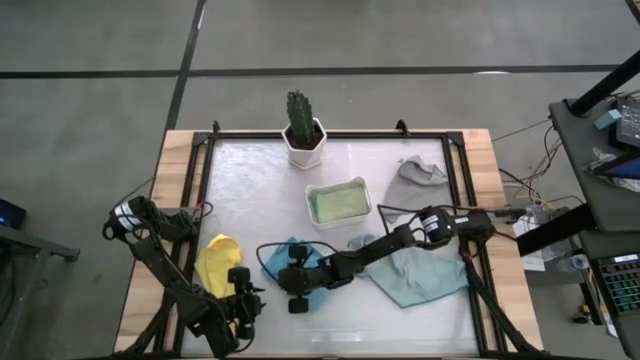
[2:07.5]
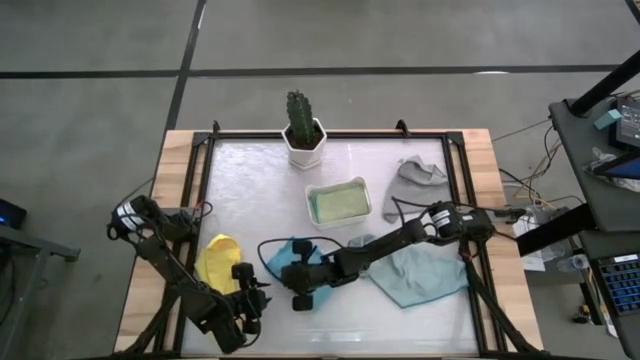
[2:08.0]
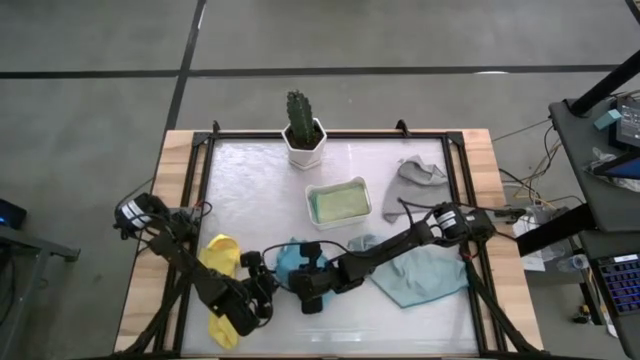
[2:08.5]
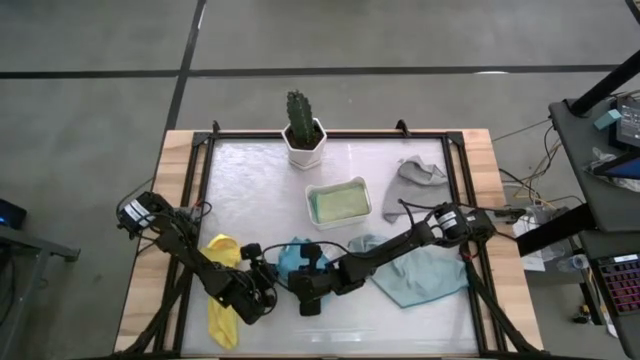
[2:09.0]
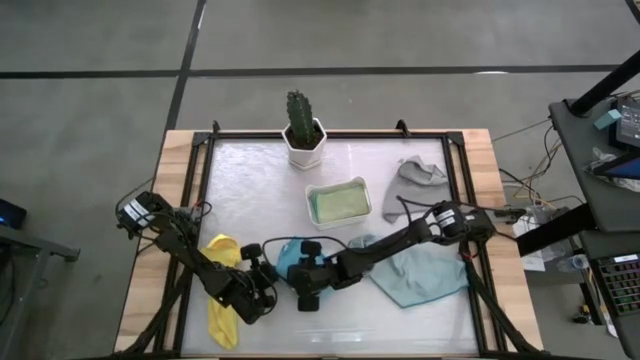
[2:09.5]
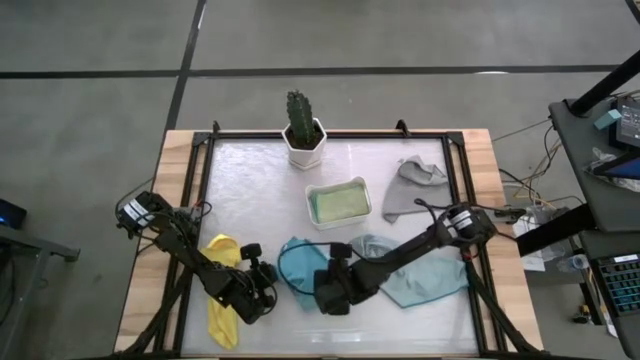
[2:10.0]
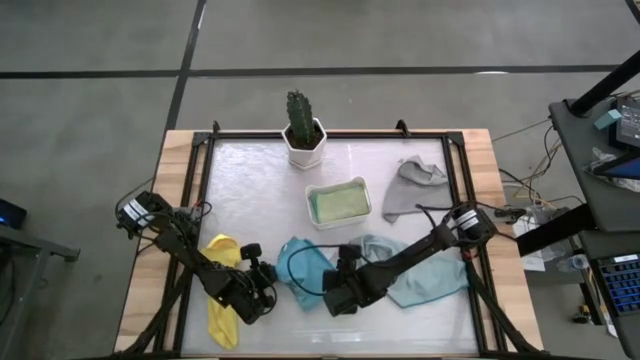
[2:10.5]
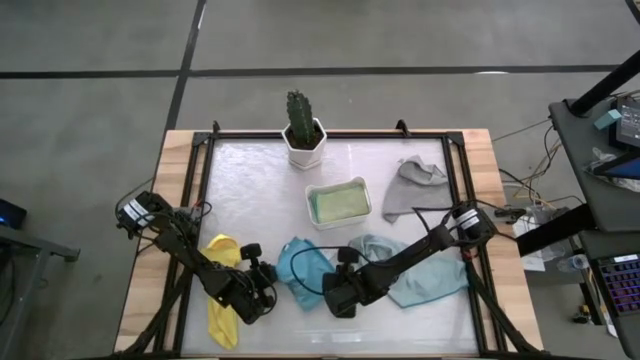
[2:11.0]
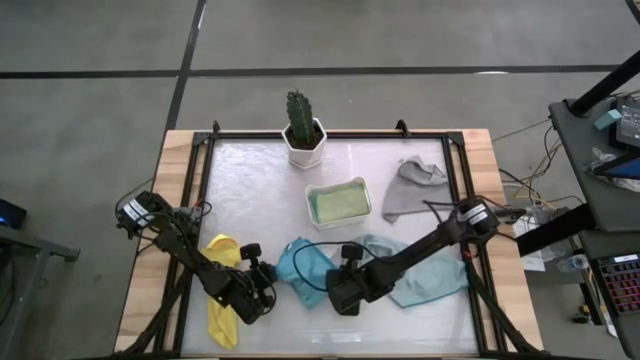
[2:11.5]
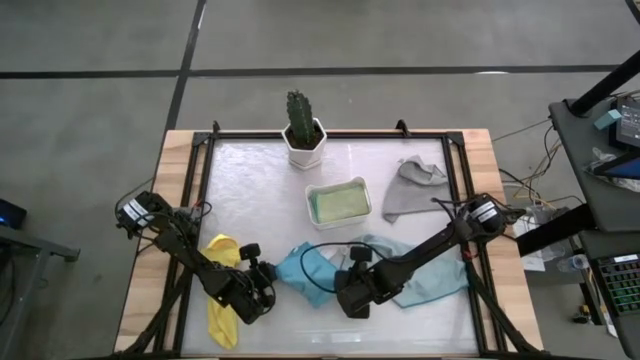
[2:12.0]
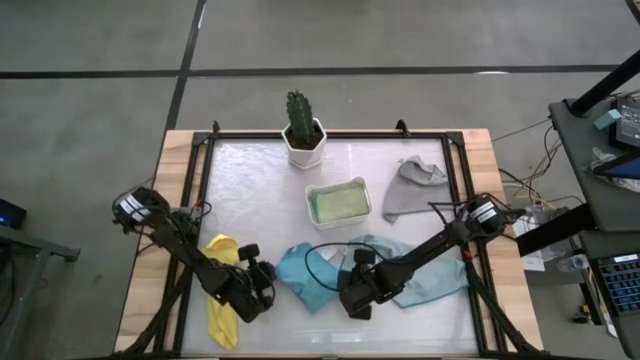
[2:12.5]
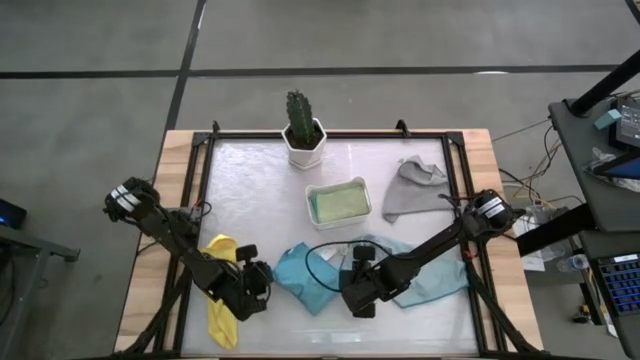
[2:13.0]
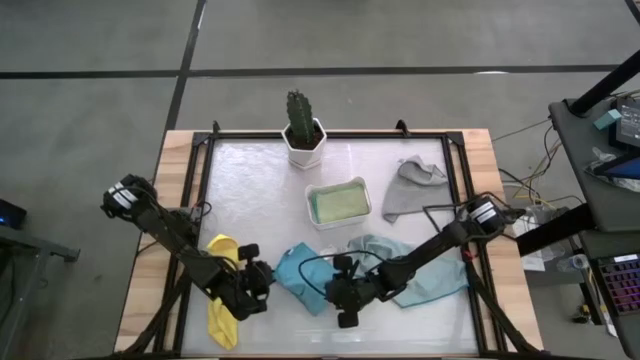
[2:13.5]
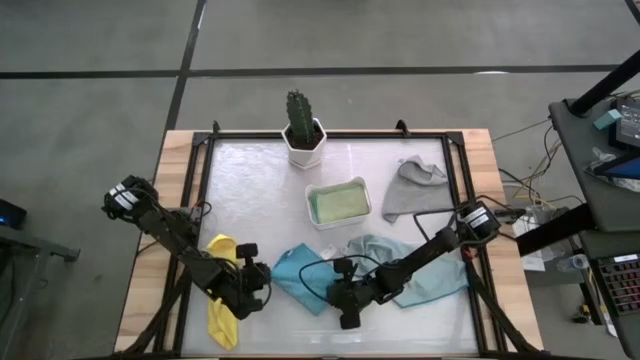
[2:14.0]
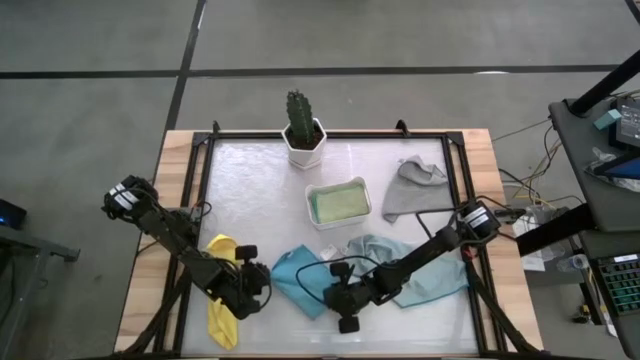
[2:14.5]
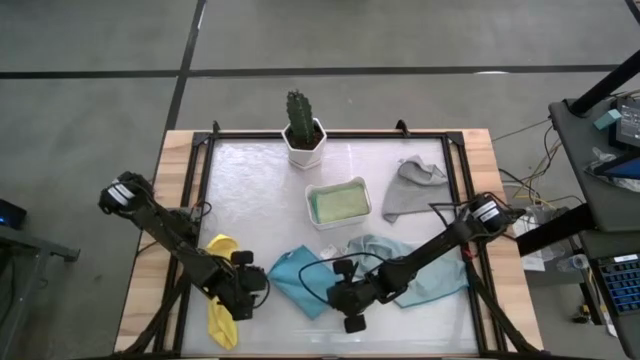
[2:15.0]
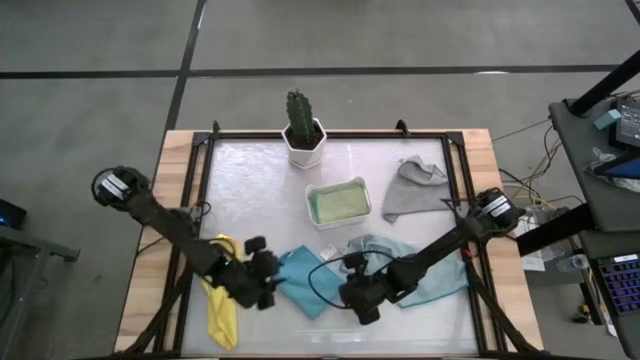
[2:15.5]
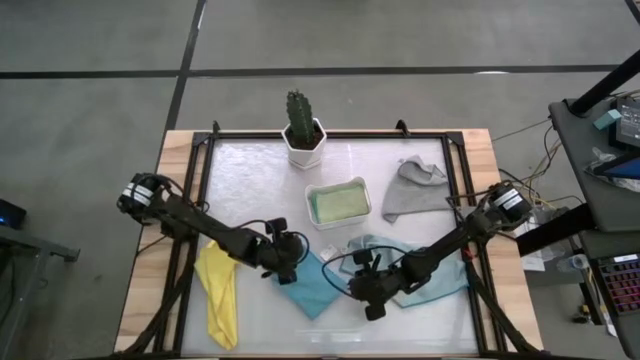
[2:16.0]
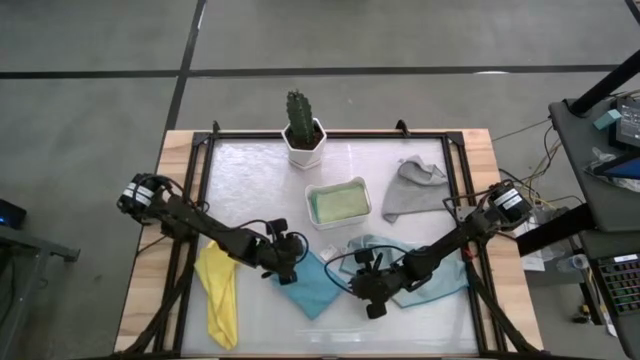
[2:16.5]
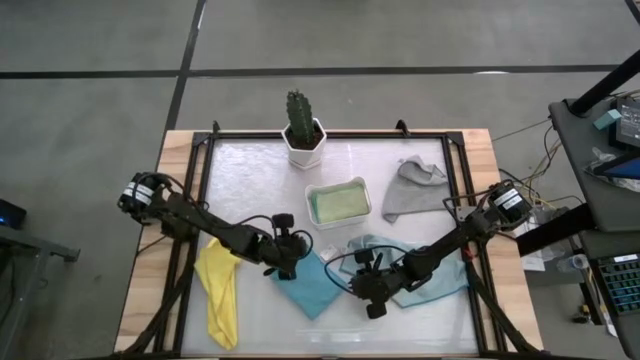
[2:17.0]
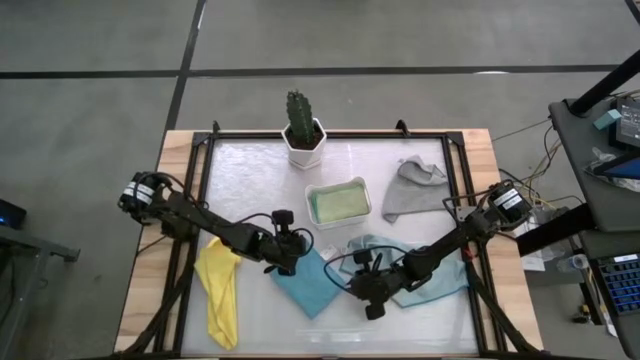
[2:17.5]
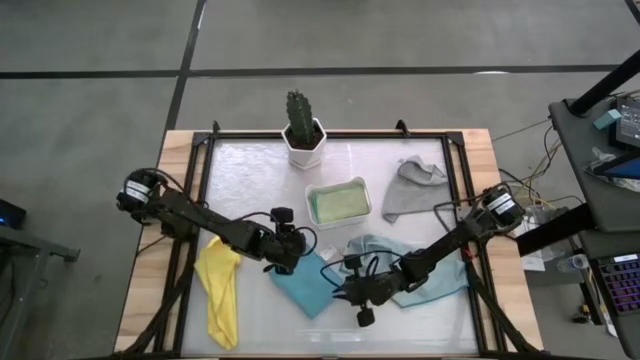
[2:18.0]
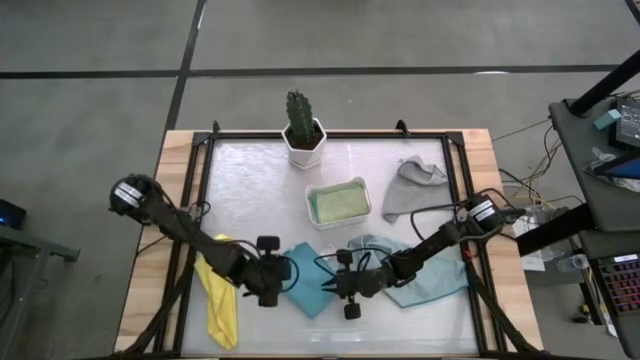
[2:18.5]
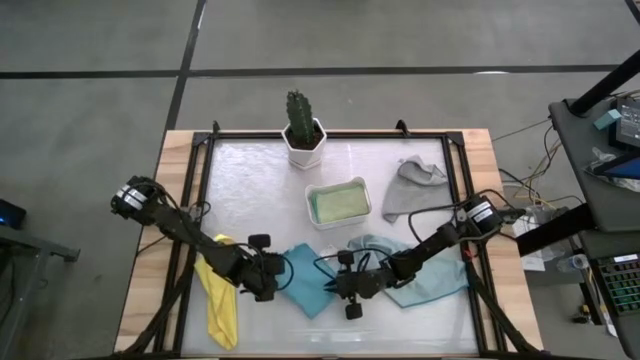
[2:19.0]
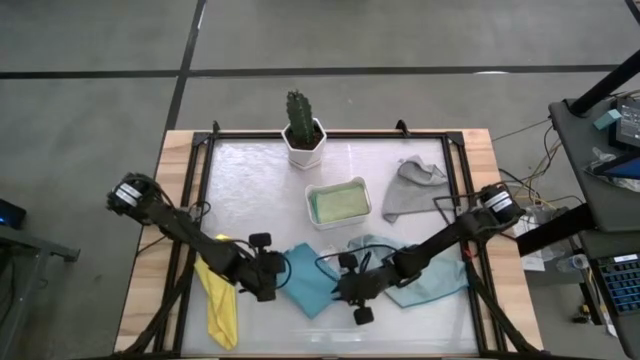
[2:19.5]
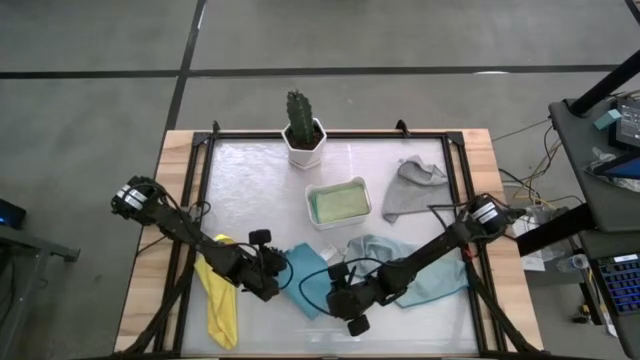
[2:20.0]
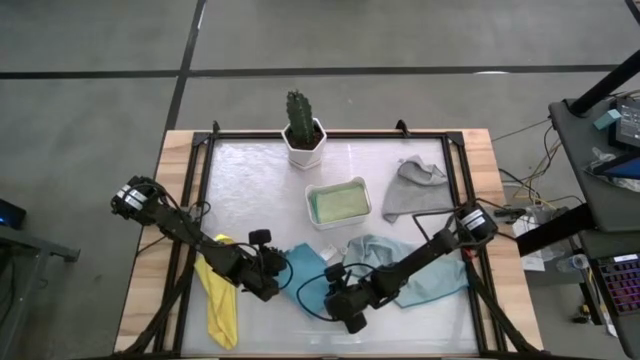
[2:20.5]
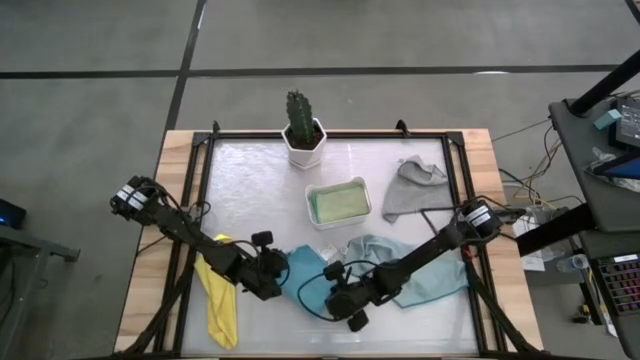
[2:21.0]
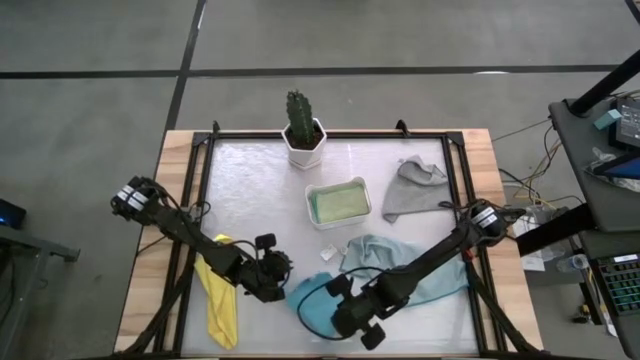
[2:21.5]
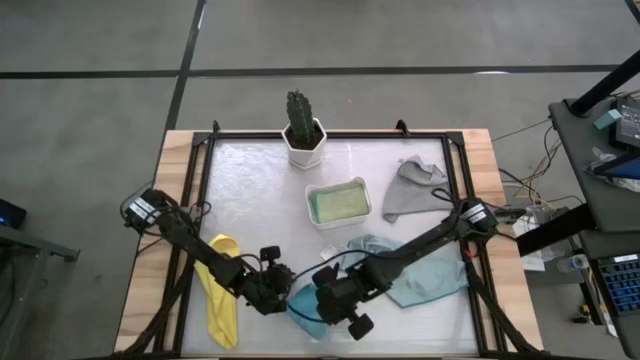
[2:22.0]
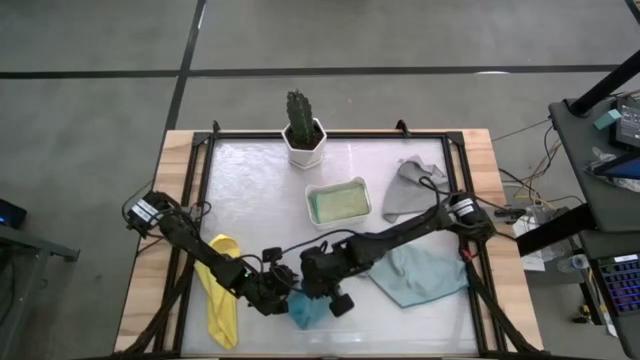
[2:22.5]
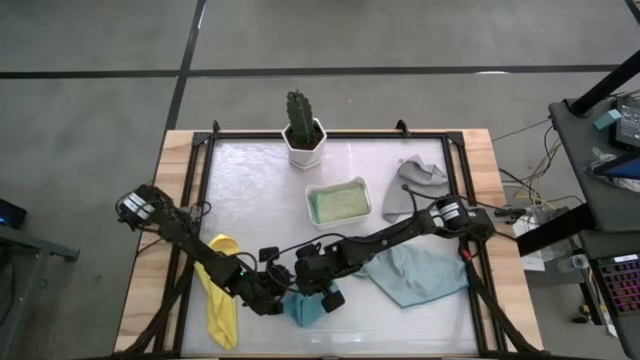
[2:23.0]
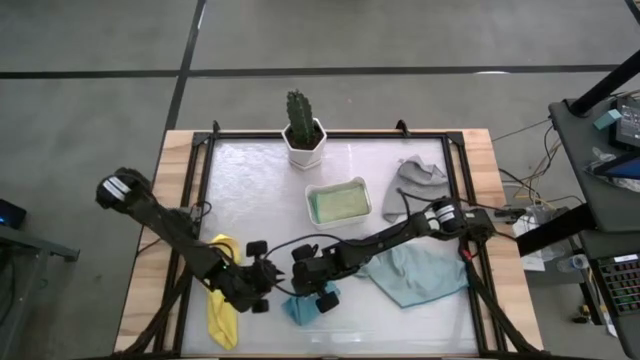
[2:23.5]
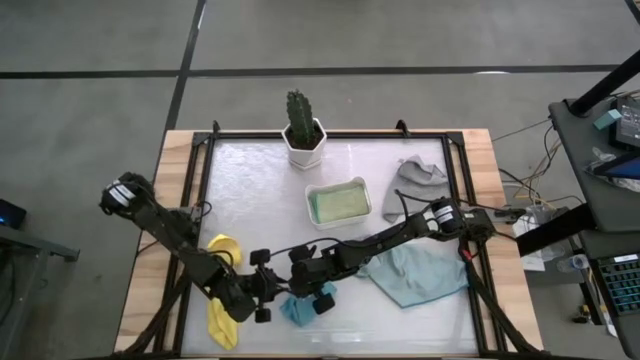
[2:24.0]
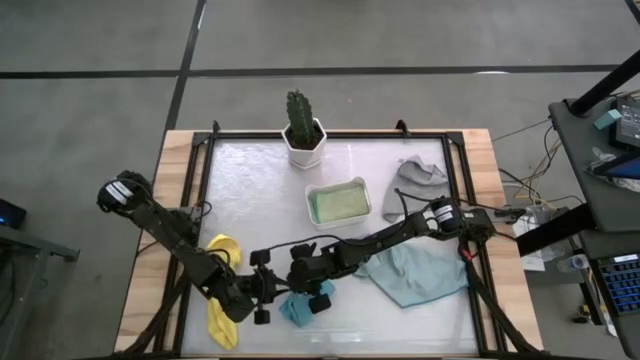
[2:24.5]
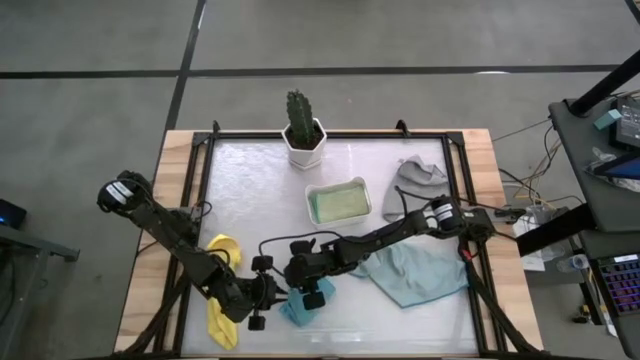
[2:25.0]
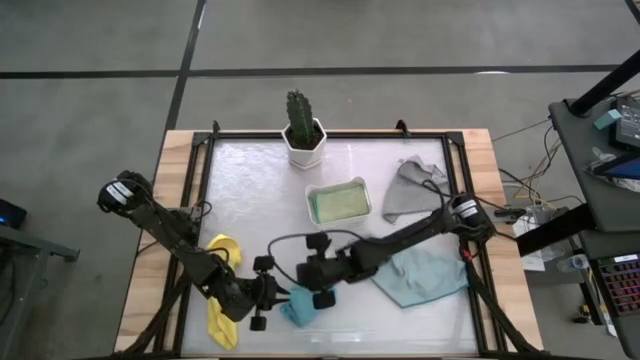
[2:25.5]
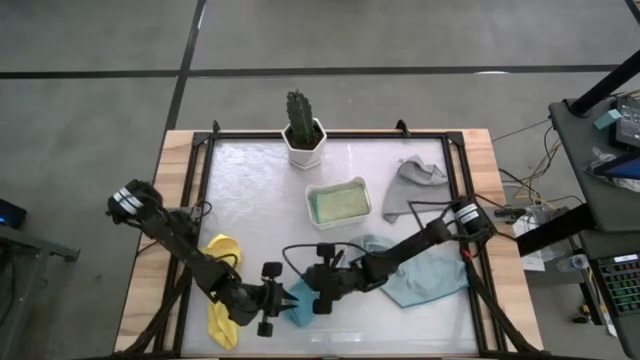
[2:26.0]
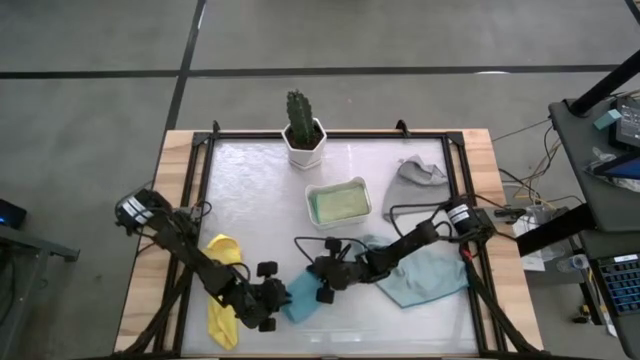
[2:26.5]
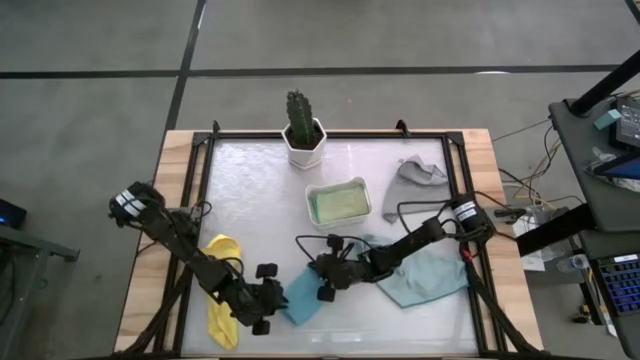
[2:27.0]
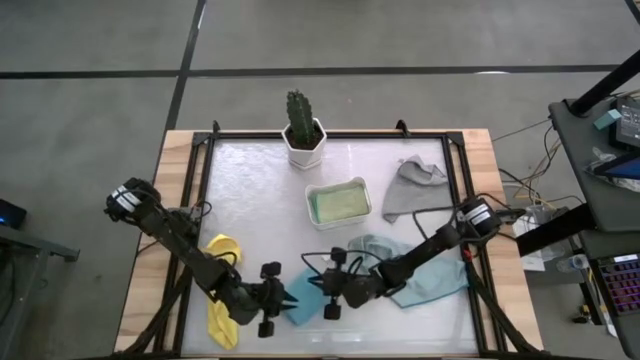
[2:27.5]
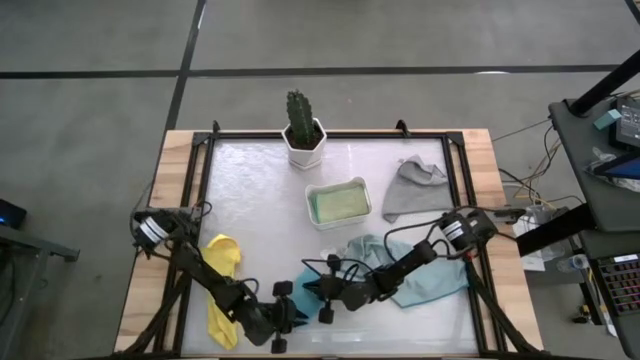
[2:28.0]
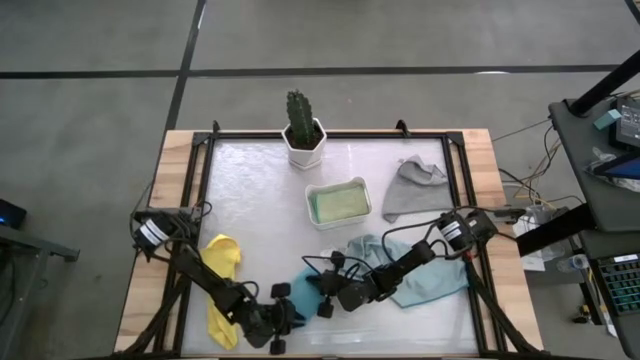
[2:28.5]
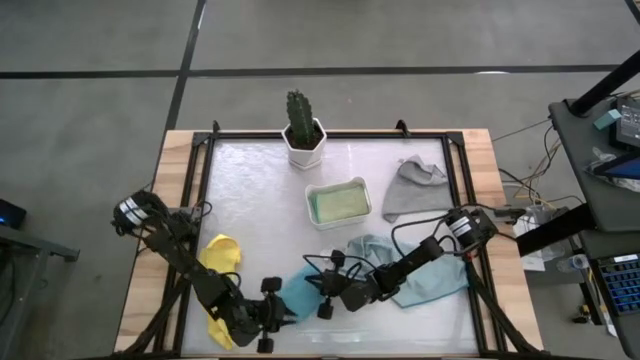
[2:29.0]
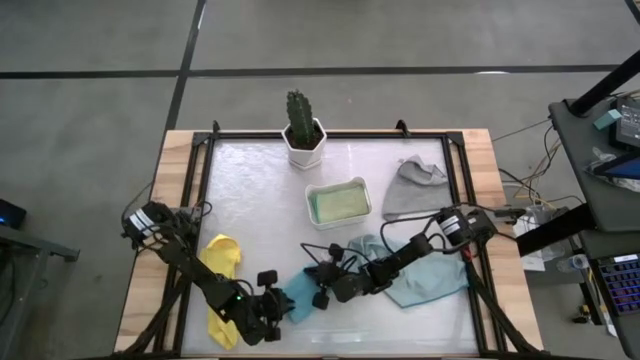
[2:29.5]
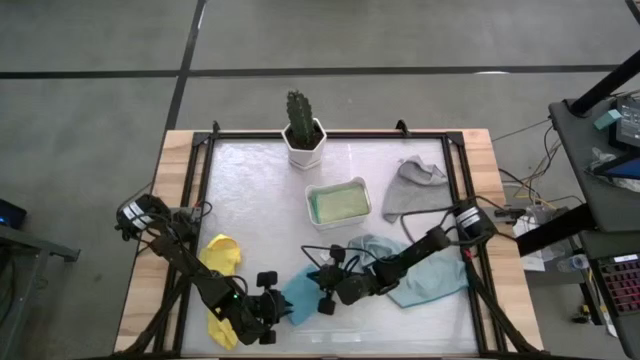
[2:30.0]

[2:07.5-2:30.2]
Task: Fold microfiber towels
Fold the dark blue towel
